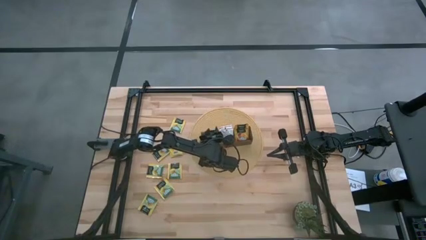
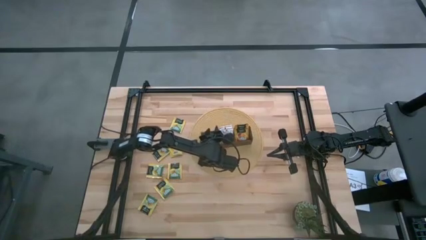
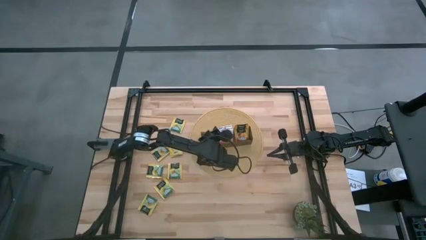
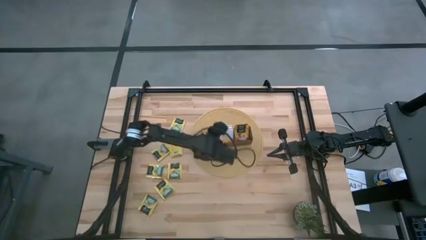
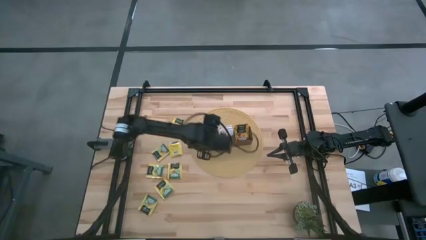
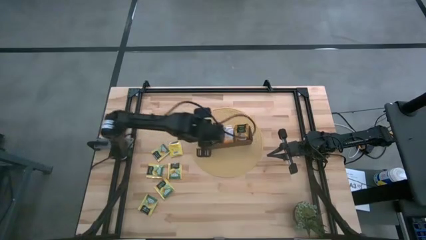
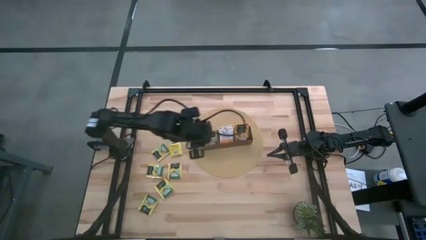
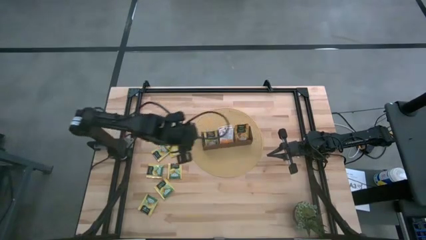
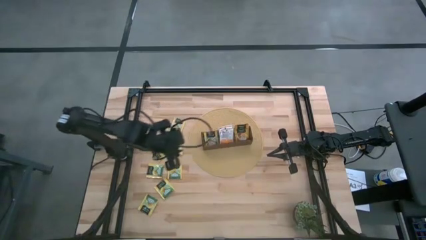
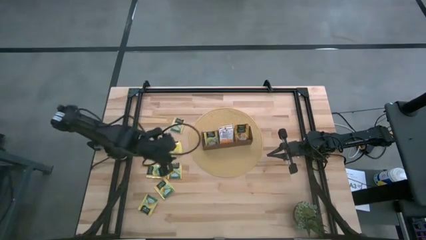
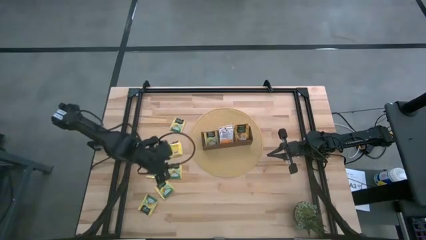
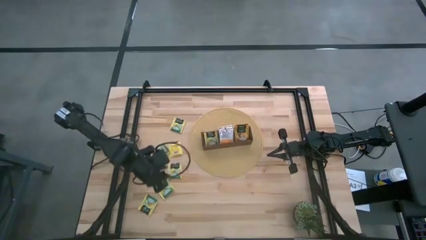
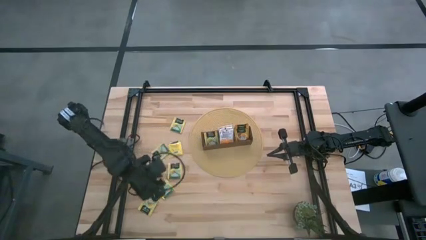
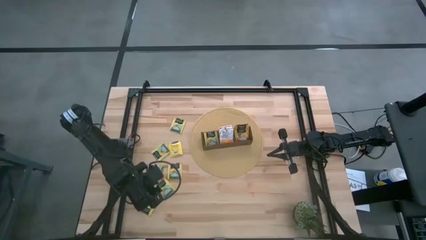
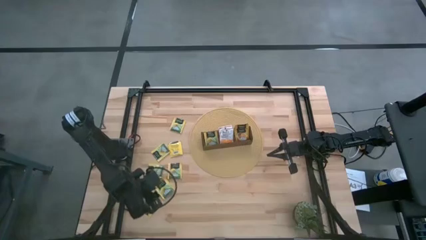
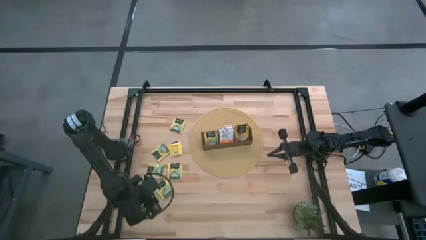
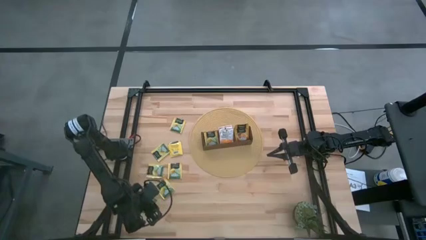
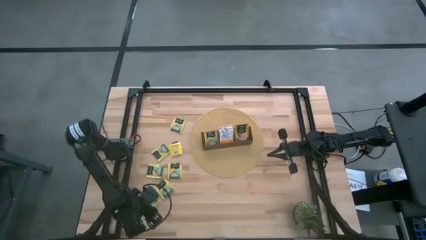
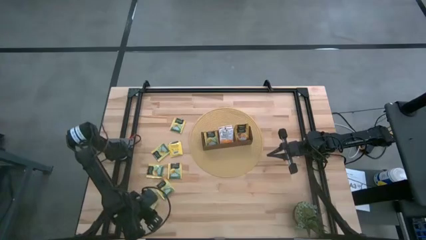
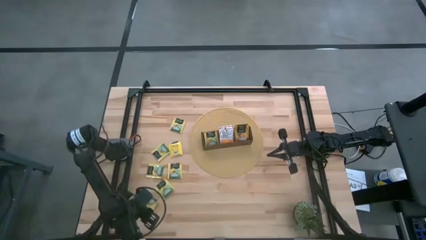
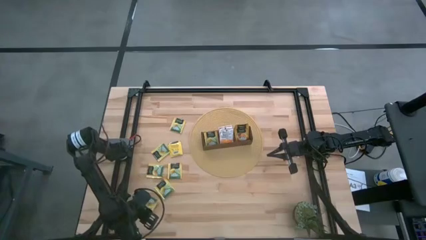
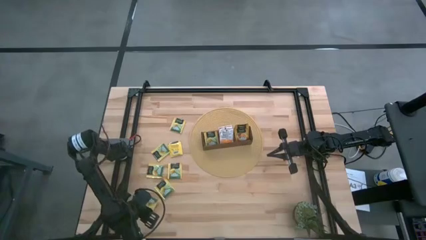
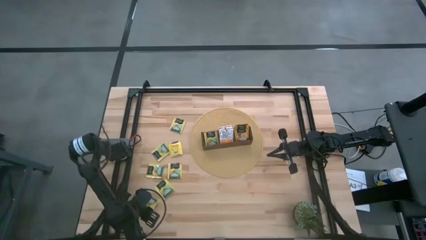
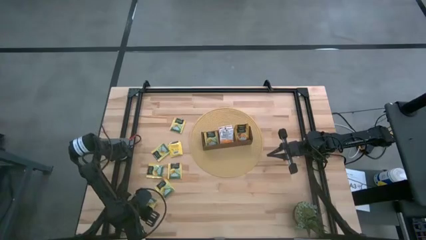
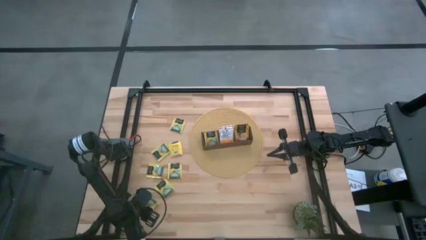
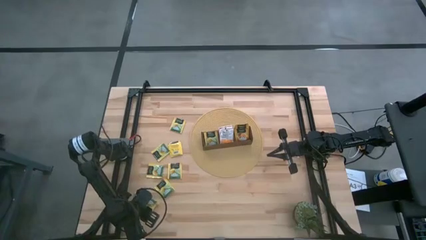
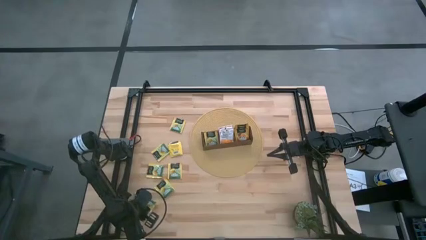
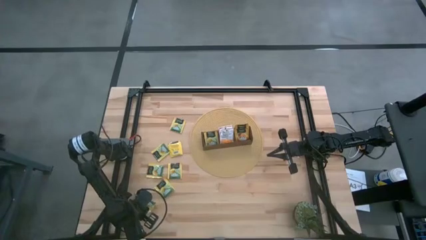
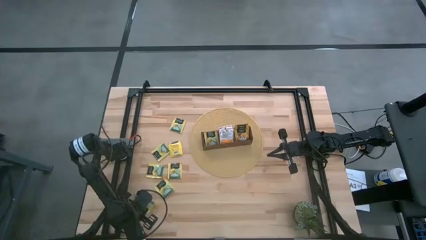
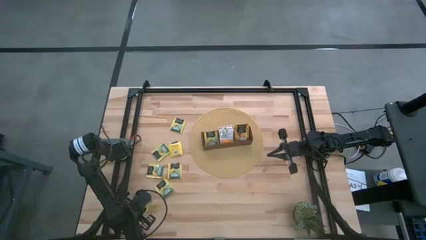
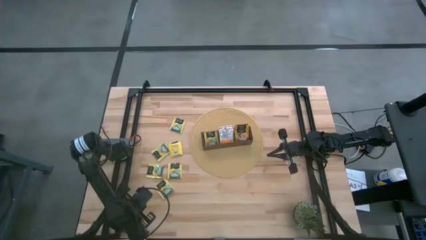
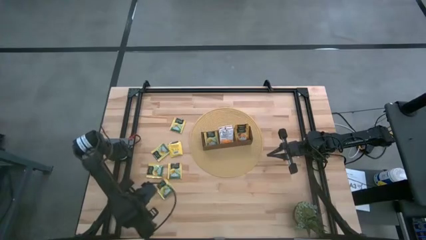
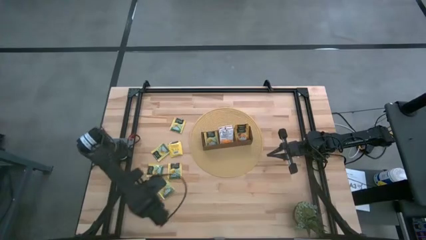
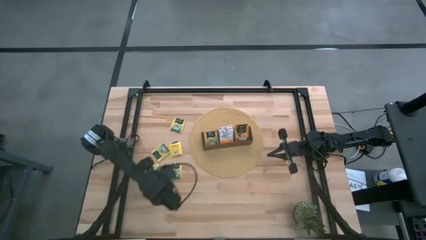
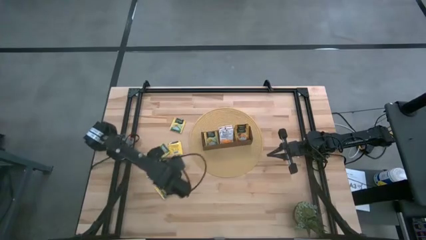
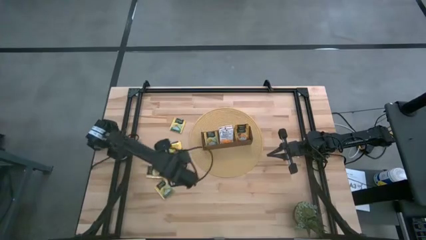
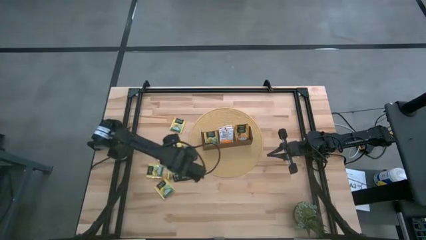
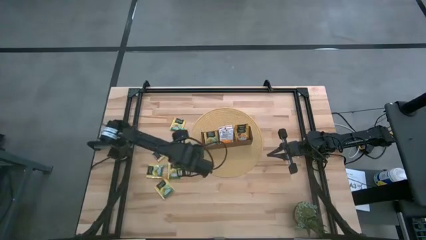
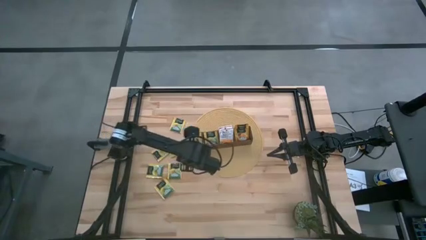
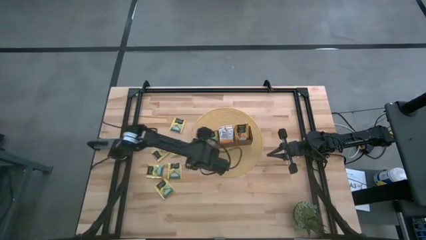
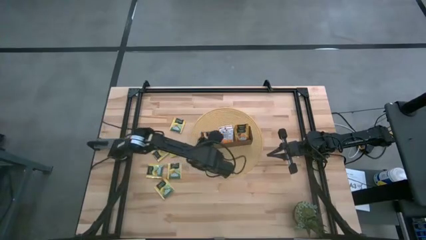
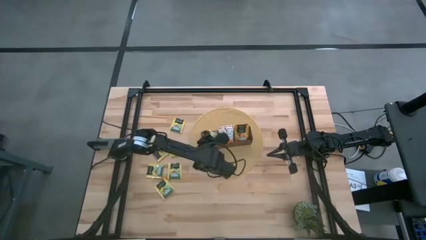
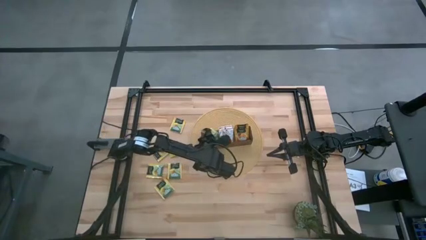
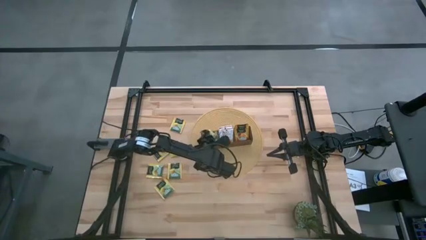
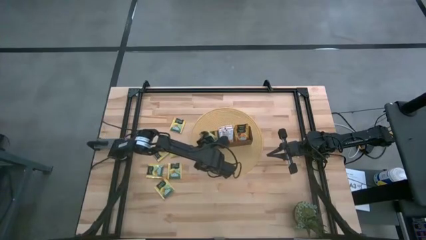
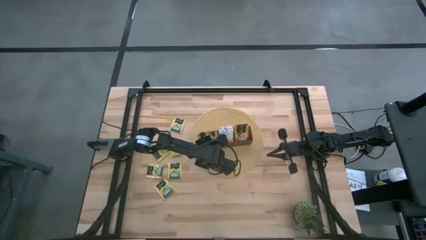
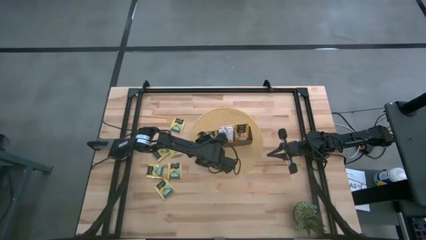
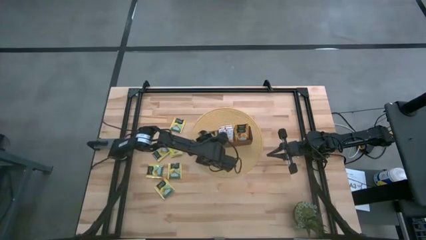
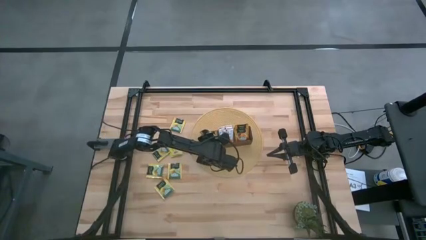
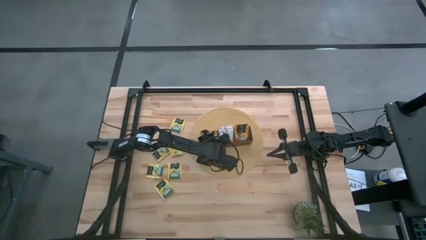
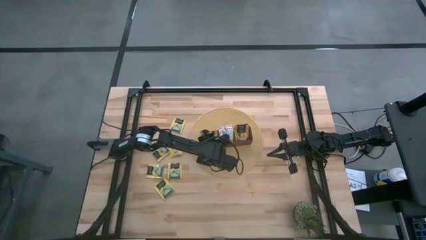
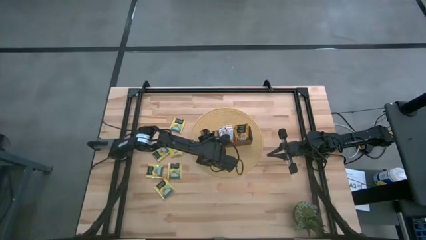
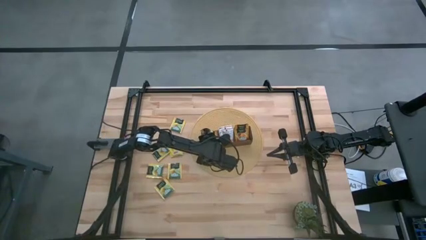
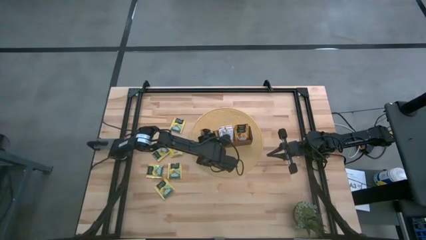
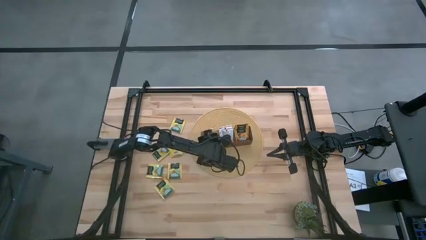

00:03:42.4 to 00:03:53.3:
Task: Pick & Place Tea
Put the yellow tea bag into the left section of the wooden organizer

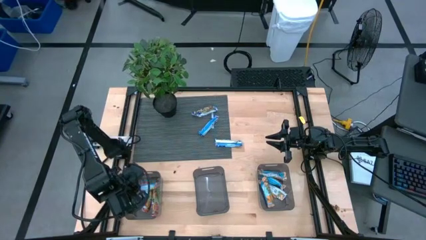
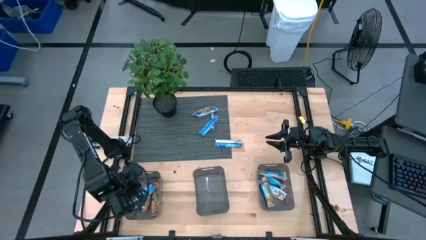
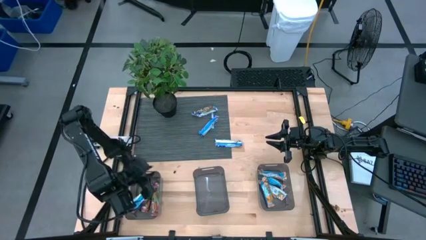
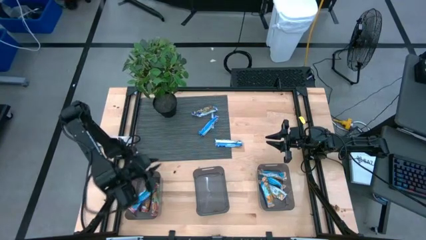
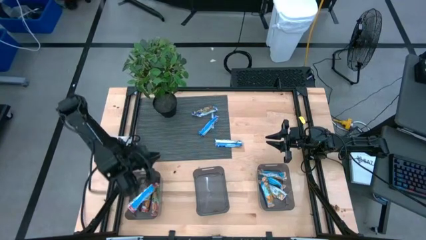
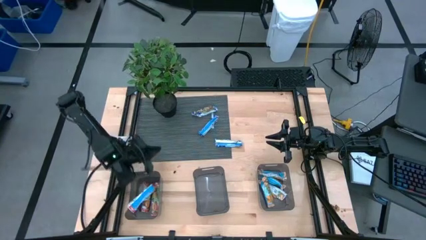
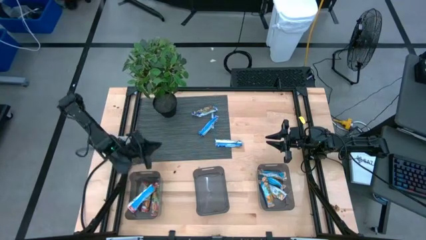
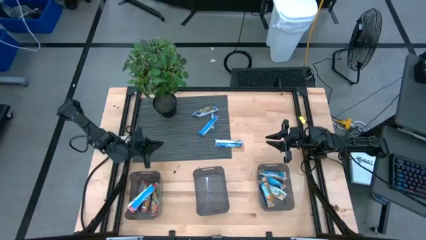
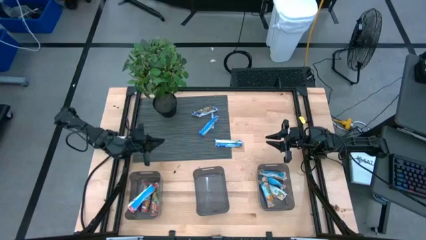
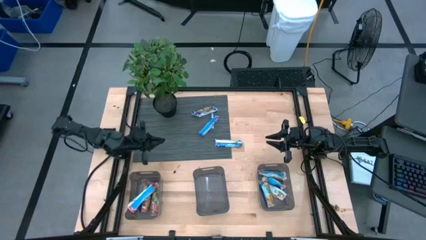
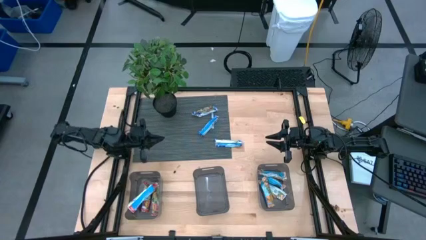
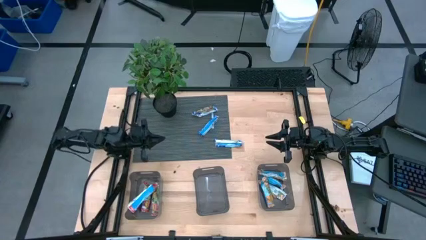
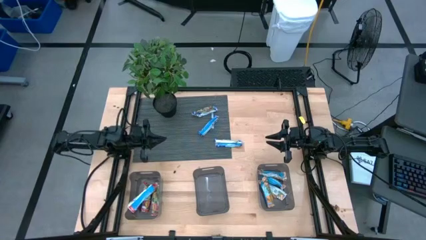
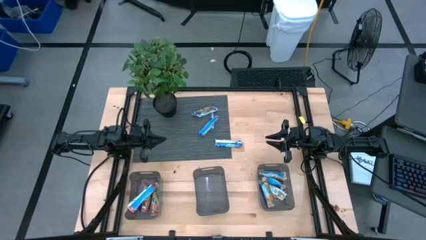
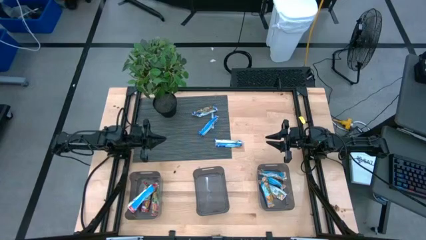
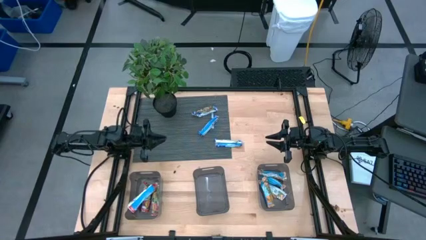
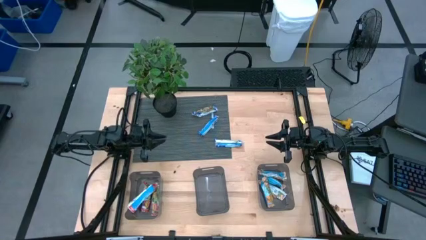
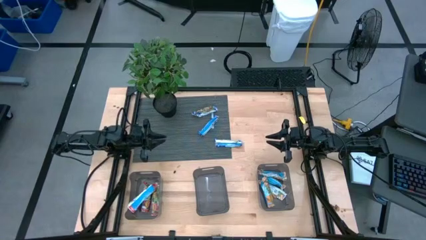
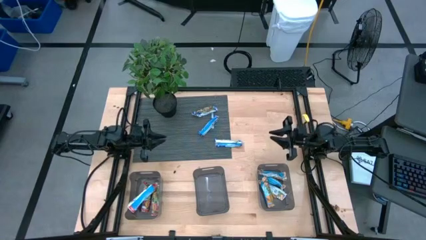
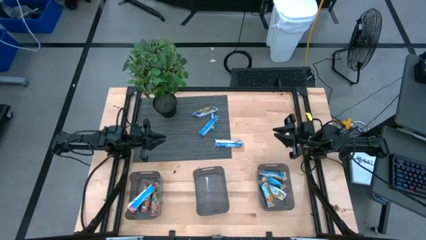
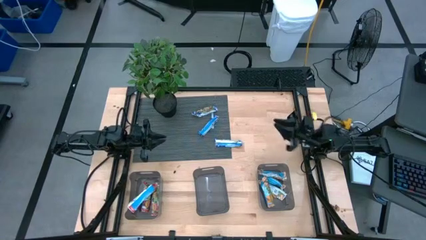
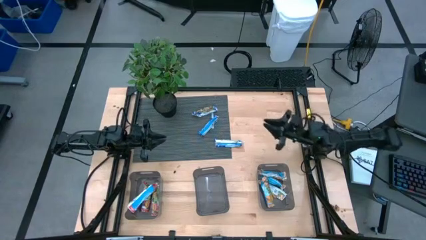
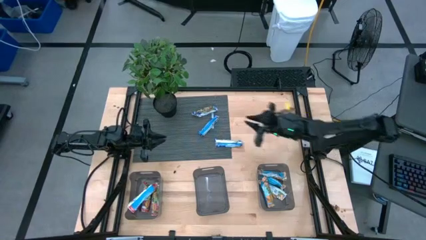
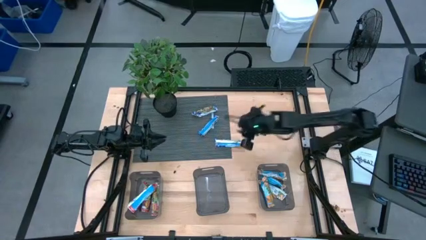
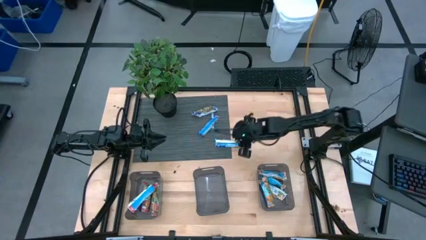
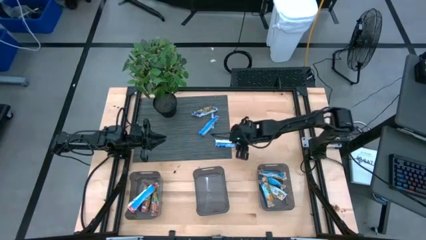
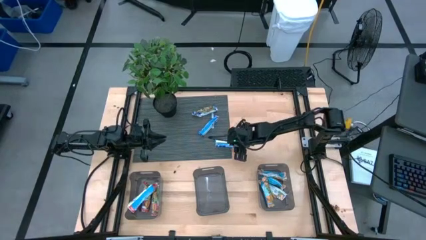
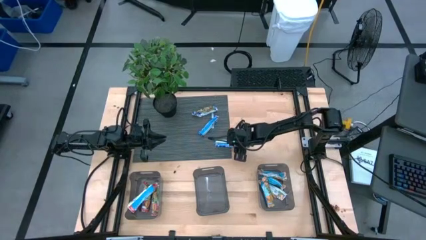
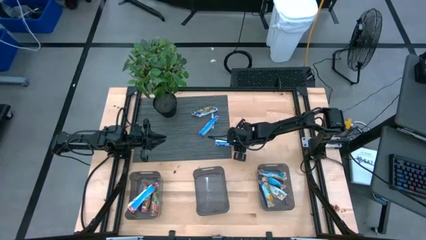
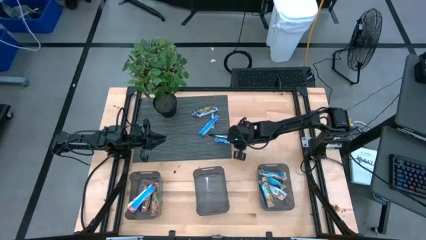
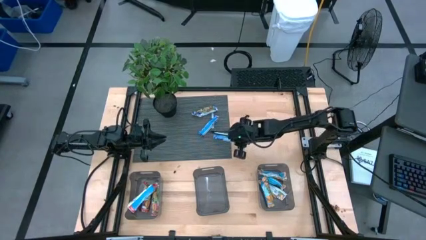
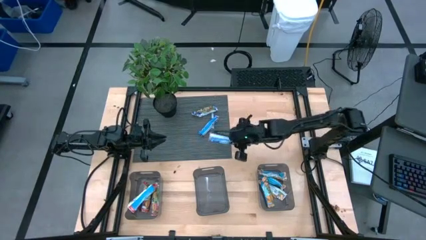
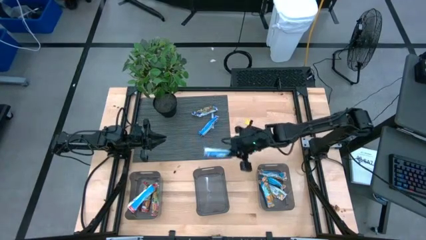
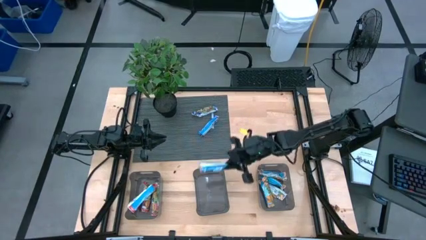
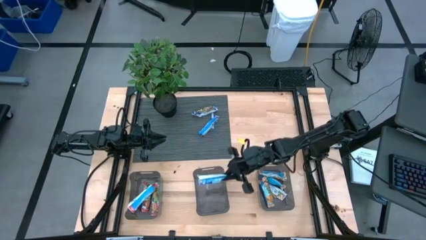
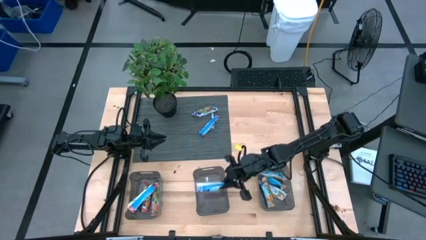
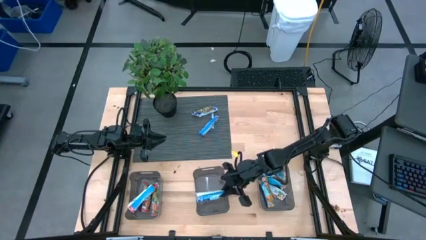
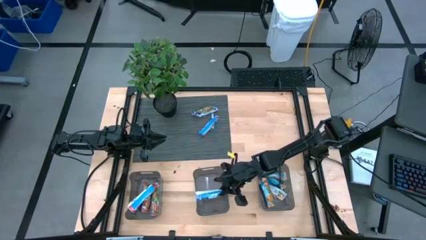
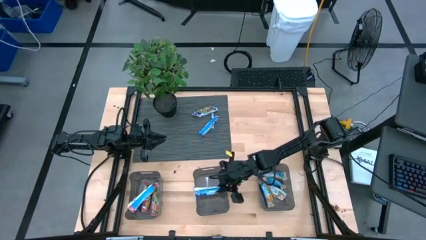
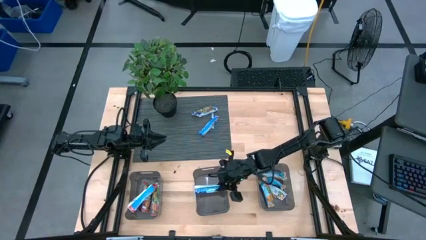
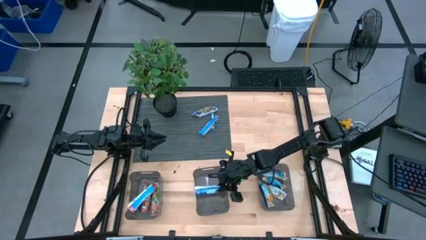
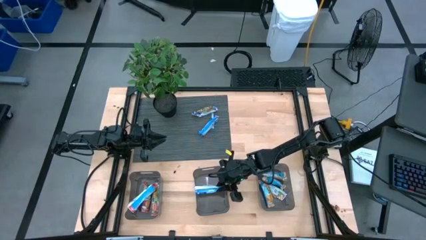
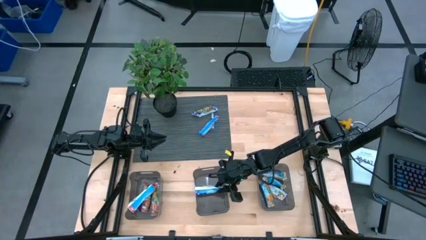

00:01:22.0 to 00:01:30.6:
Task: Pick and place Granola Bars by type
Put the blue granola bar into the middle black bin
